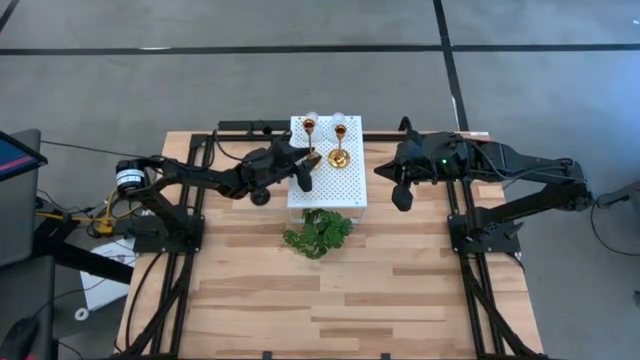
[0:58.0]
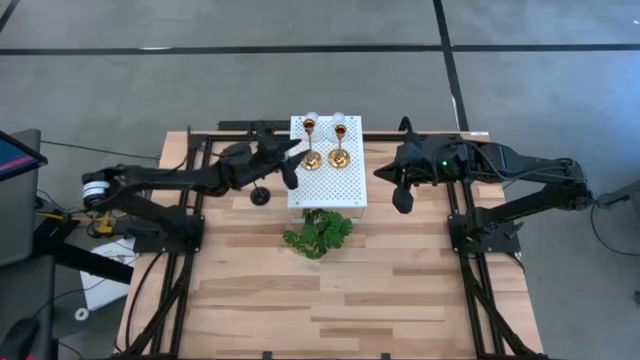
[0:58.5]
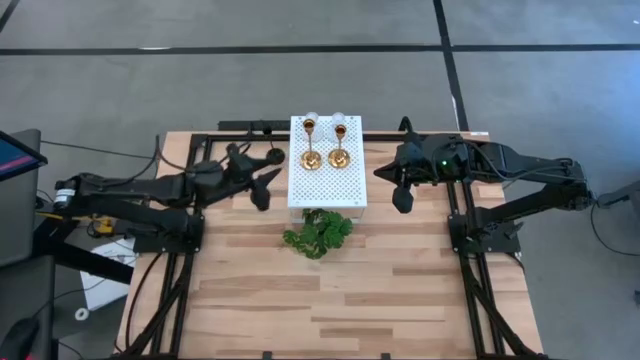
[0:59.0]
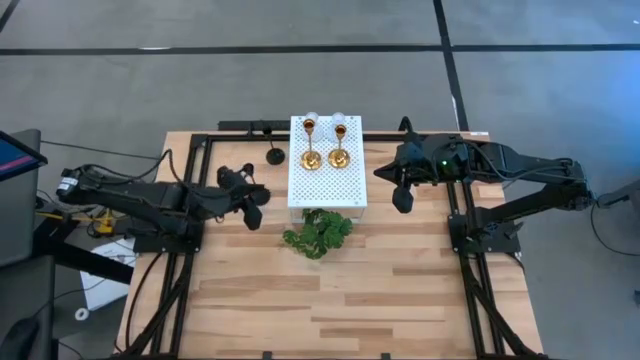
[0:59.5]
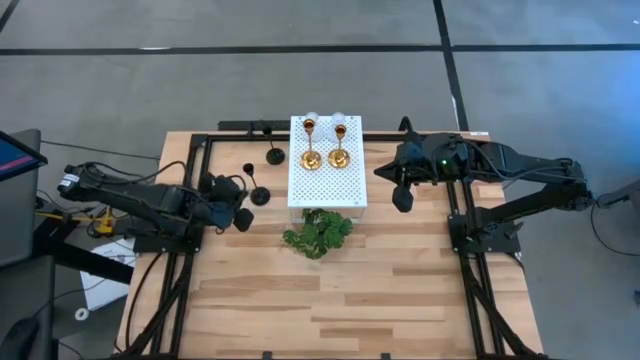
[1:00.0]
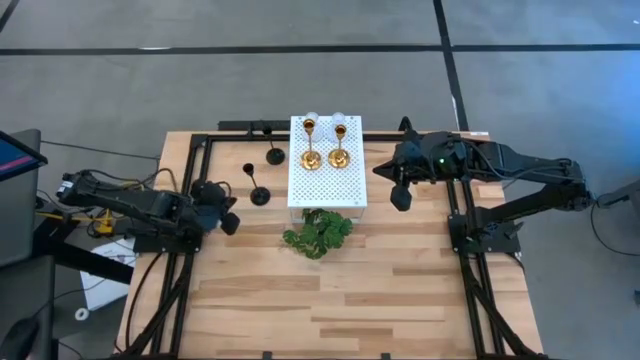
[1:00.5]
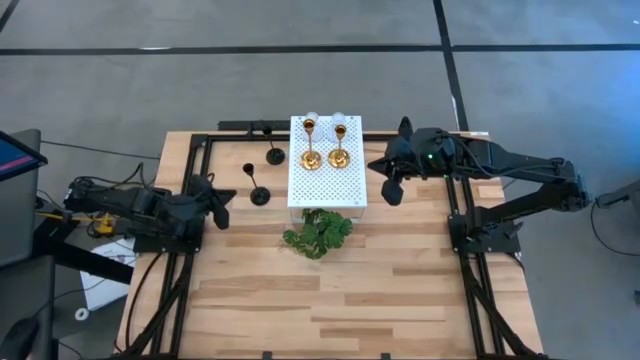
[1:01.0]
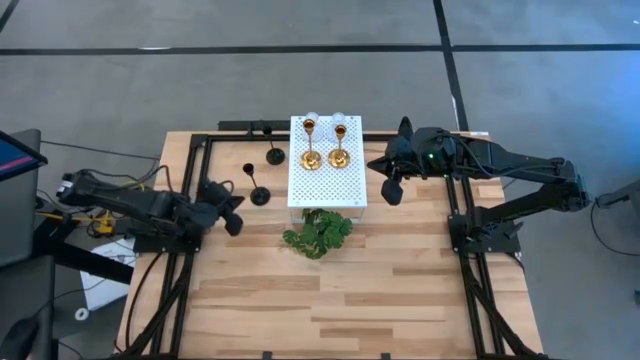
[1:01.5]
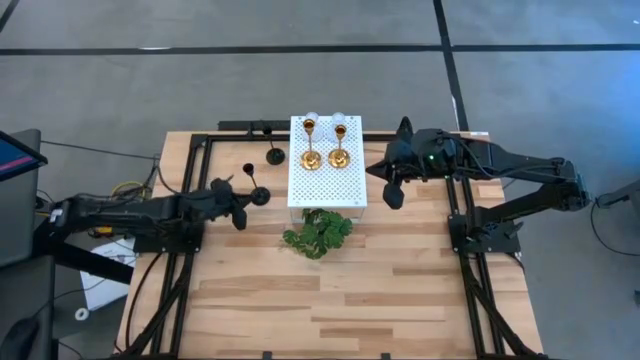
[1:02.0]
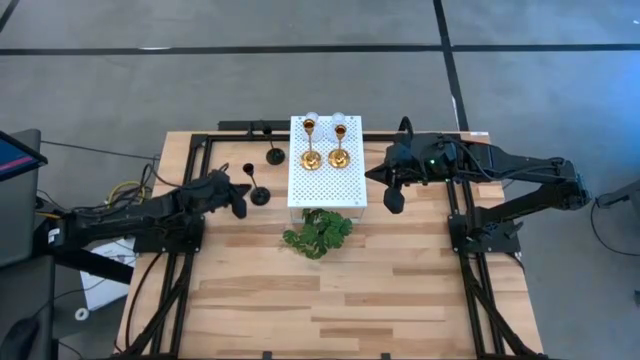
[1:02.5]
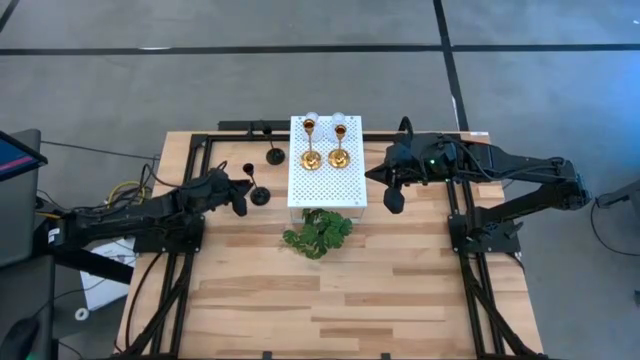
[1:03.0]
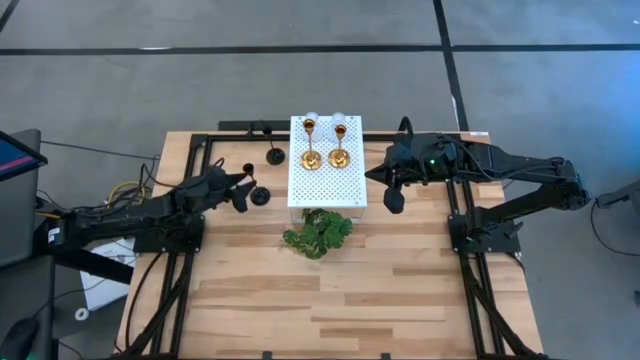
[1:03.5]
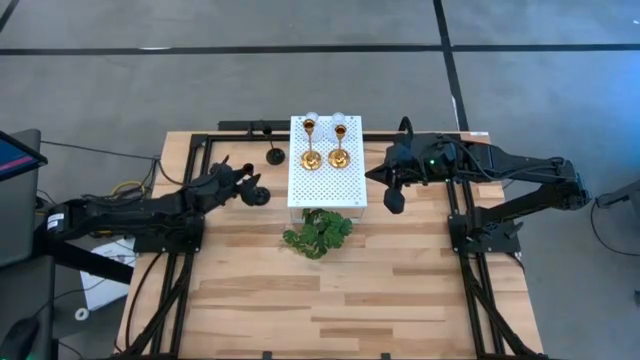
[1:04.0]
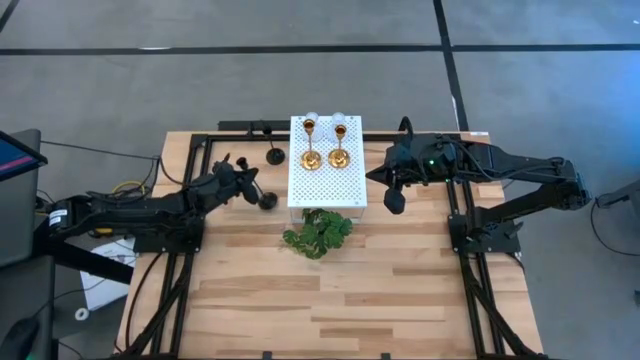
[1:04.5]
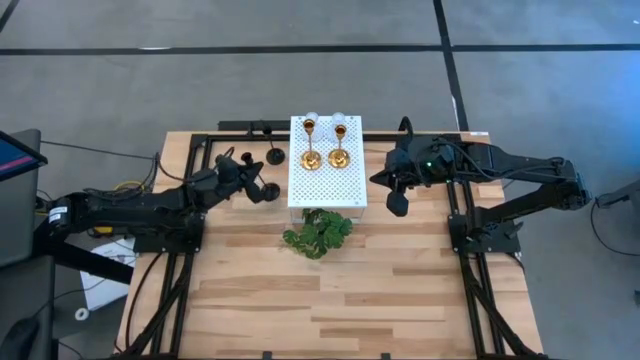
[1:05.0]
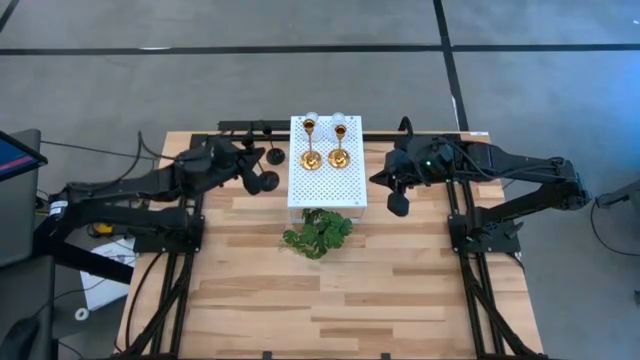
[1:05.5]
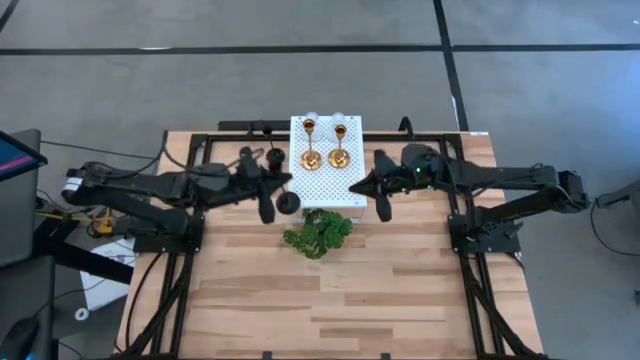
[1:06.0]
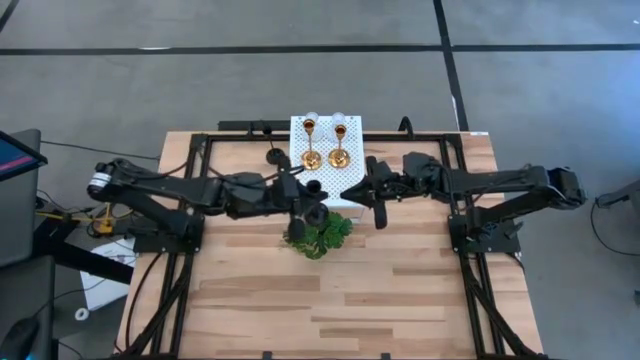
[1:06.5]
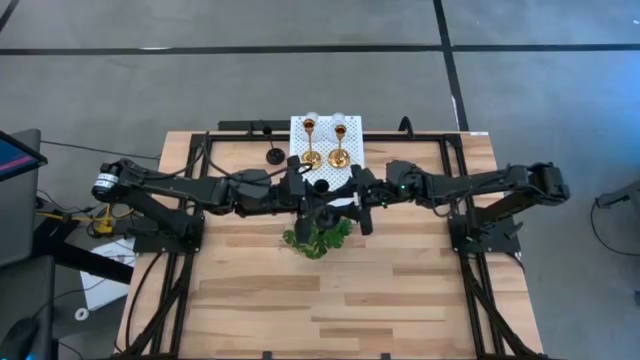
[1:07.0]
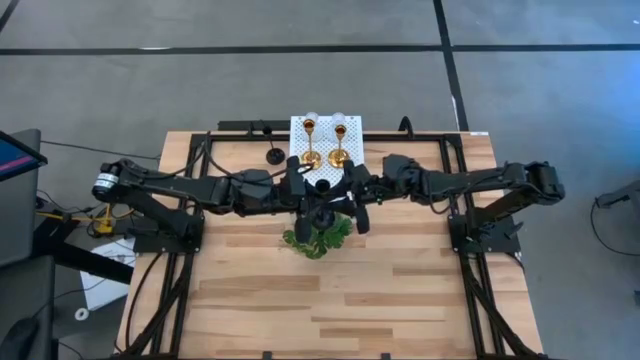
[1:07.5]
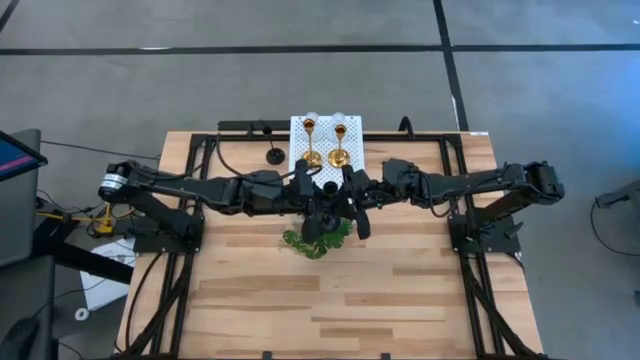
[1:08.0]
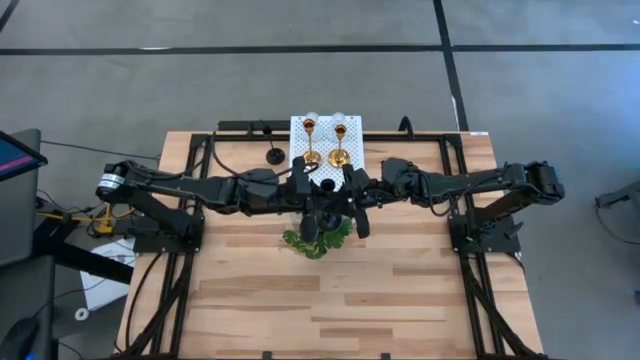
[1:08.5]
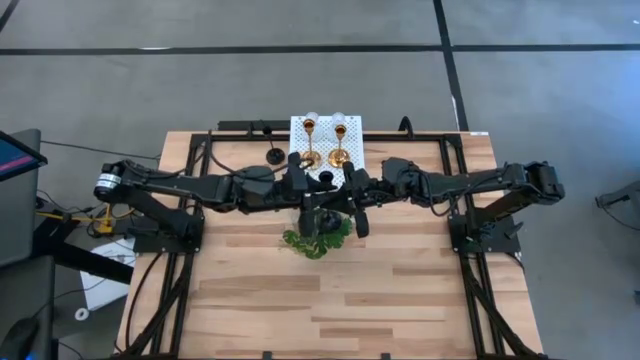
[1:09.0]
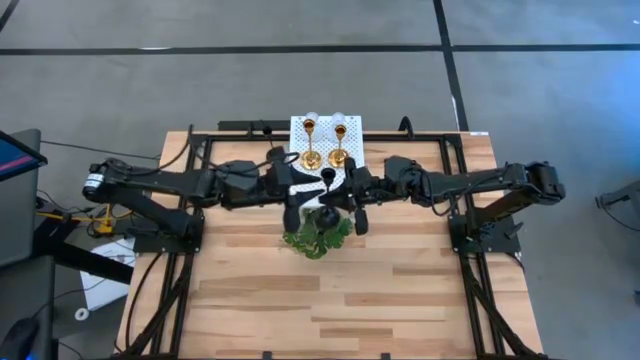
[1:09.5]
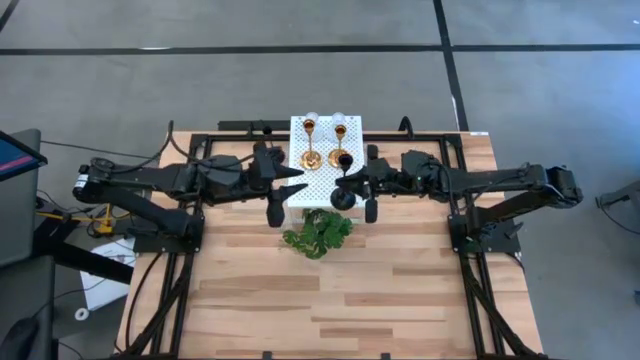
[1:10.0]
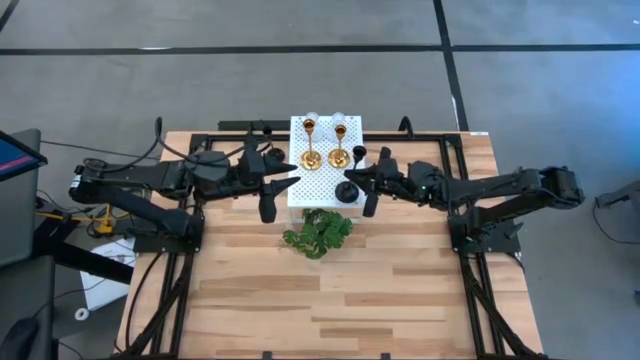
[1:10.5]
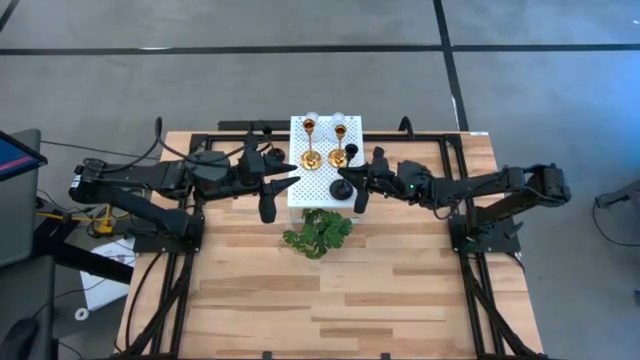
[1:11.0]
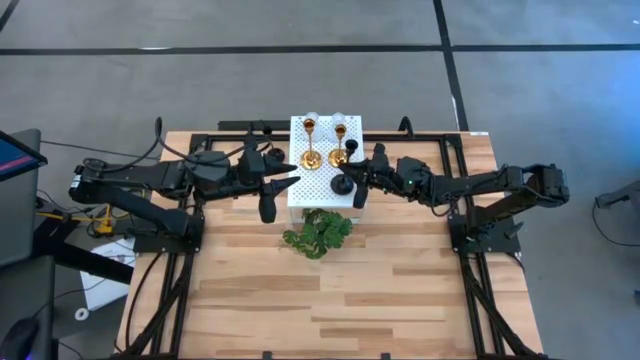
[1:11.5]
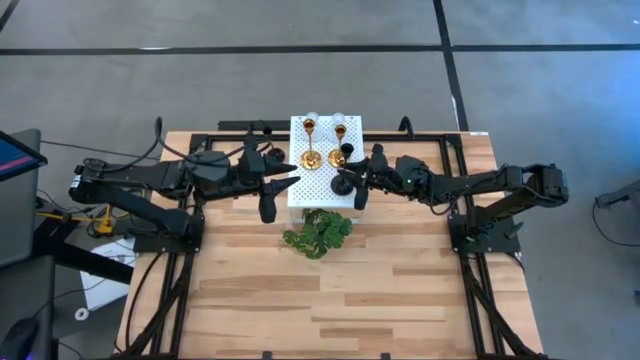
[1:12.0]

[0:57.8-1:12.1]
Task: Pick & Place candle stick holders
Put the bottom black candle holder on the shelf

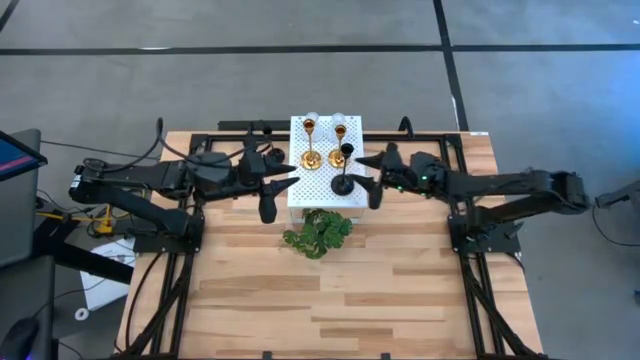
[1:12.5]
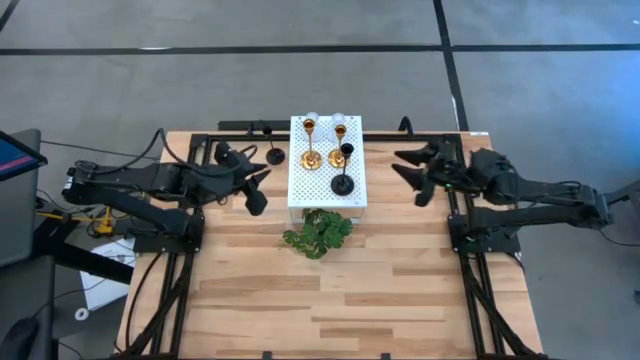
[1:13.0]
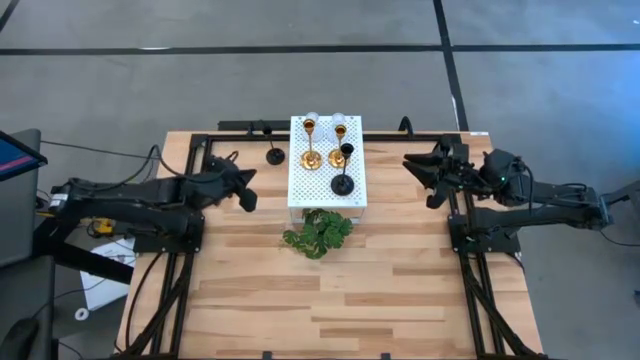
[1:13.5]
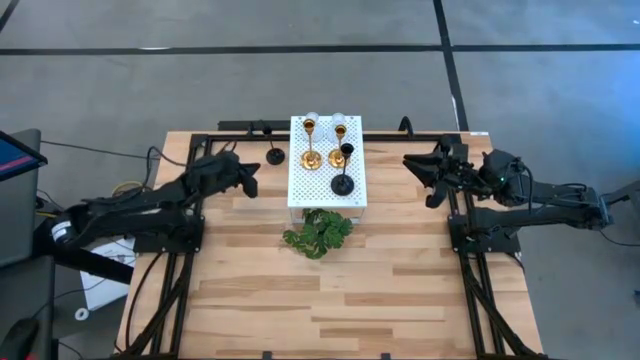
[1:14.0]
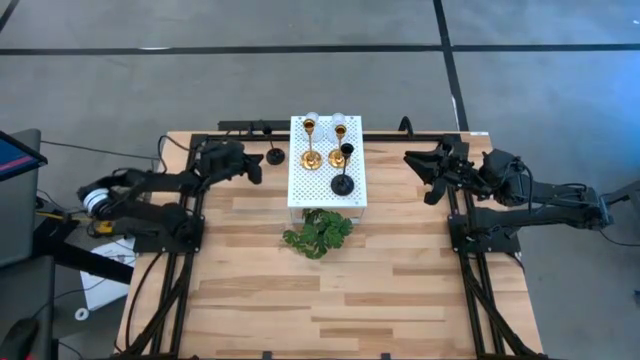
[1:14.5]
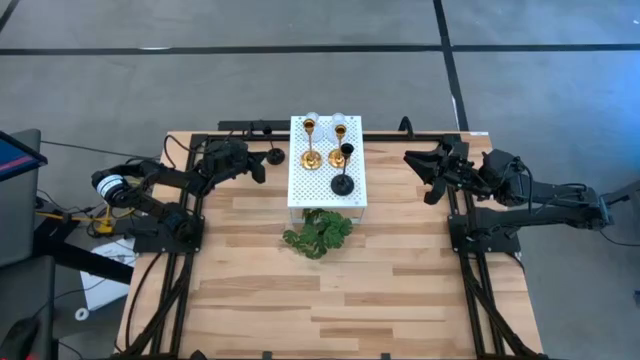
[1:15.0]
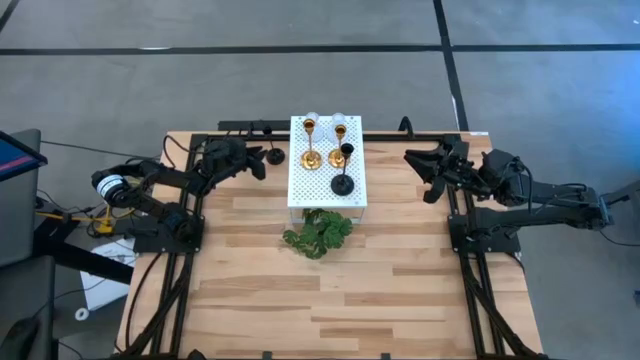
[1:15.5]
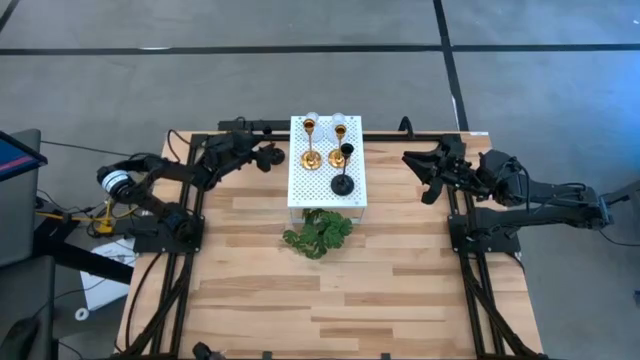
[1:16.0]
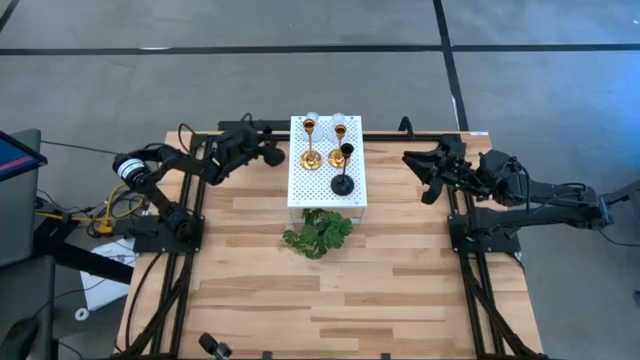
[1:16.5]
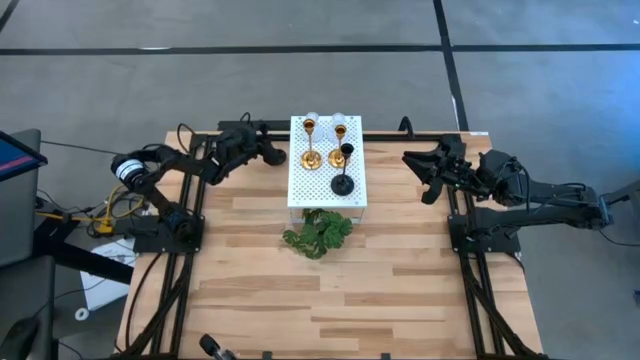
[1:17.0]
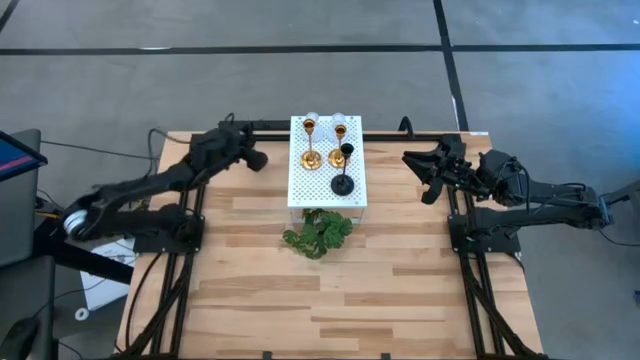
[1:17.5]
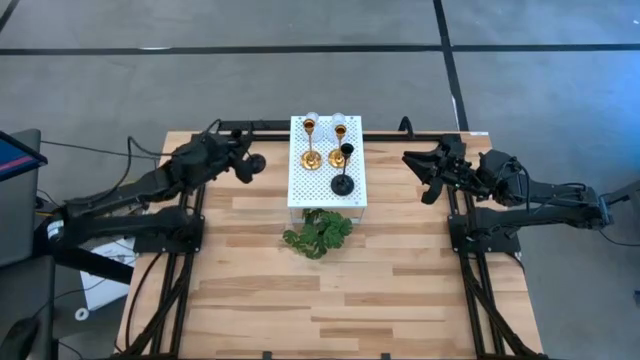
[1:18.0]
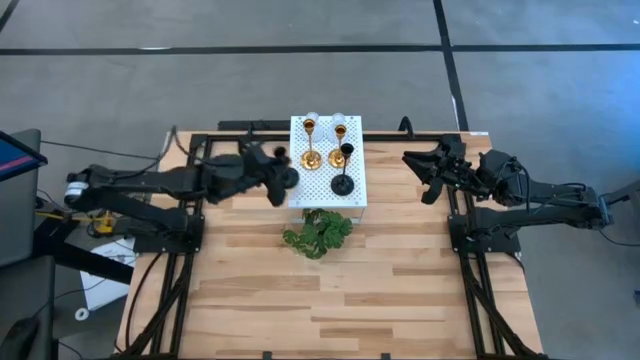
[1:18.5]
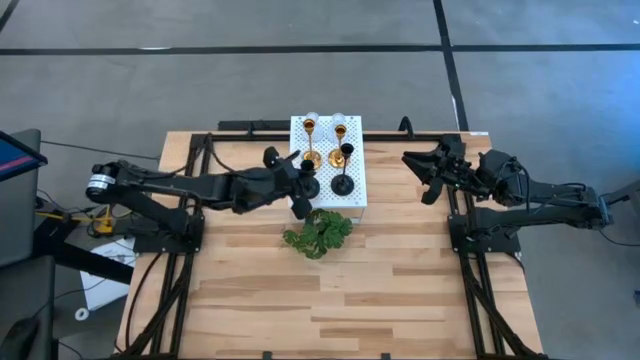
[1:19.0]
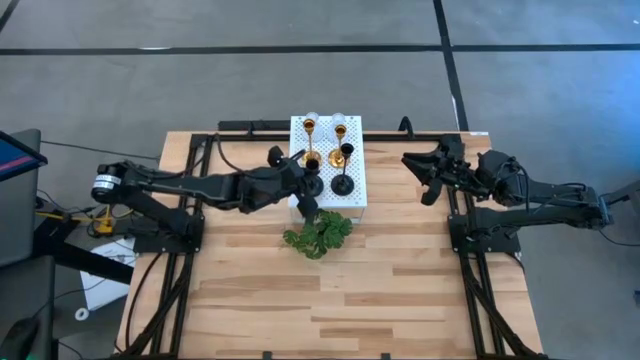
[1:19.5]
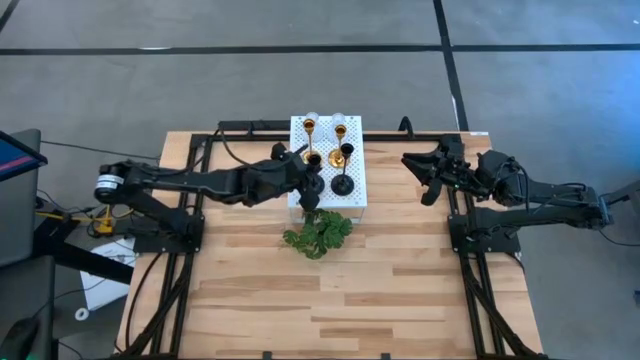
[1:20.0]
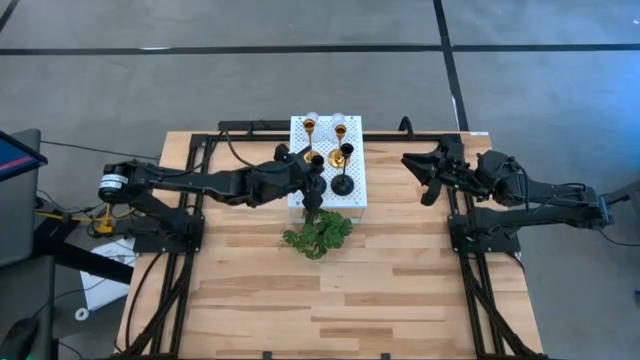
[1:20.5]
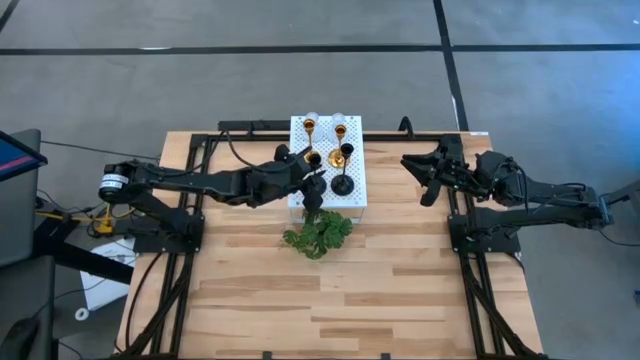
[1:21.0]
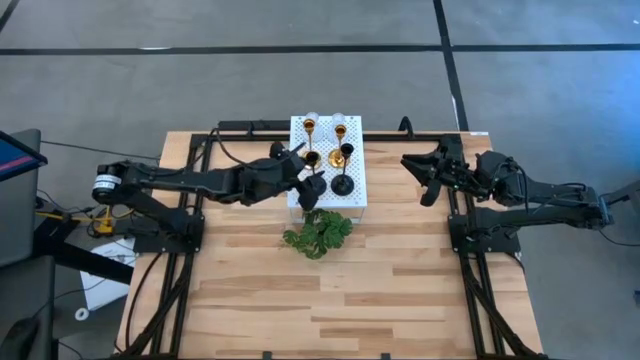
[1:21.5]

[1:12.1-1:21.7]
Align the black candle holder with the other black candle holder on the shelf
